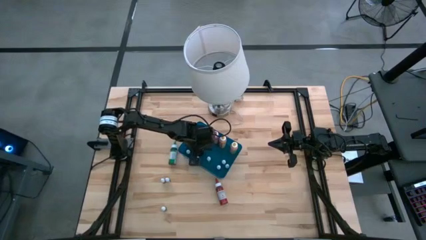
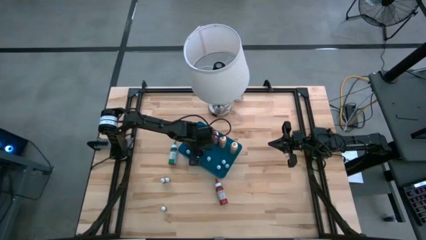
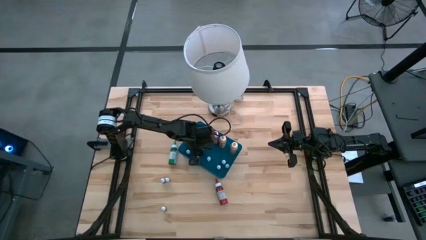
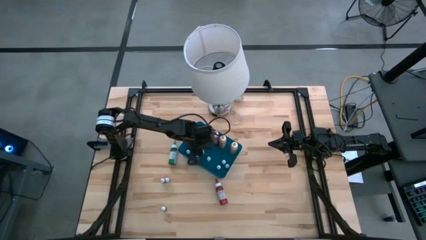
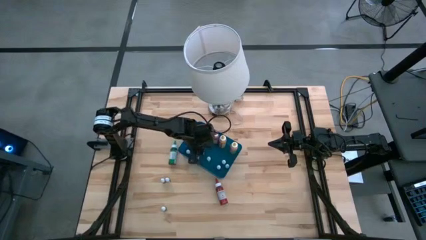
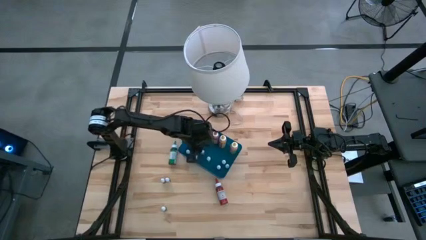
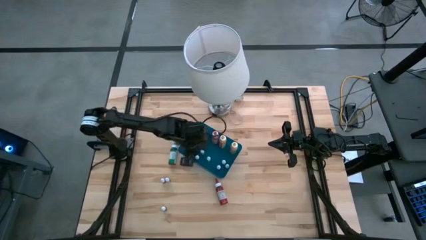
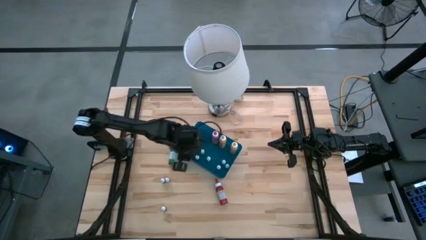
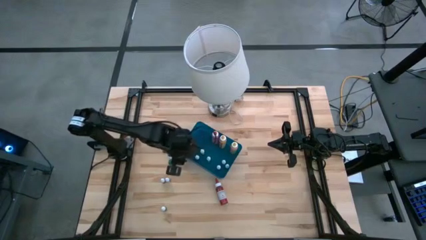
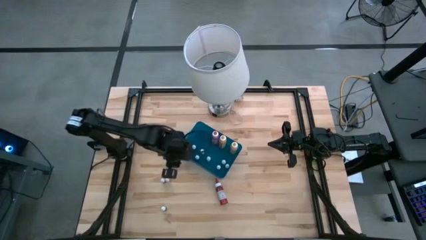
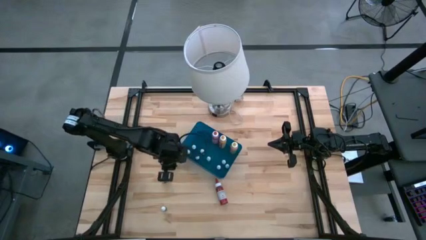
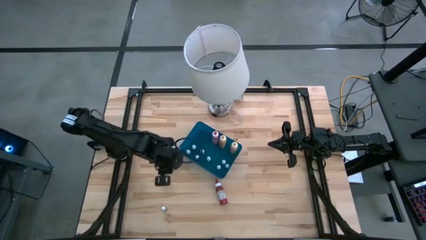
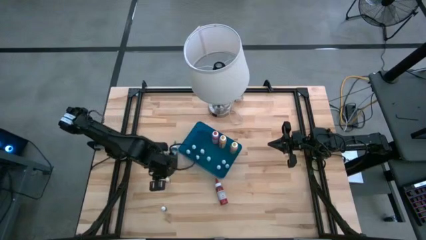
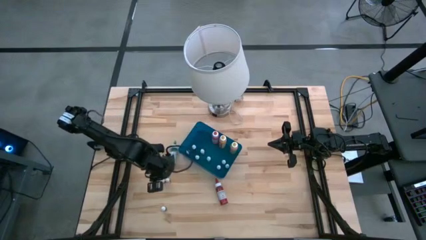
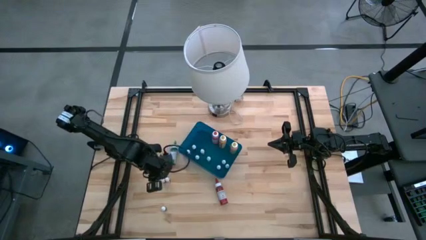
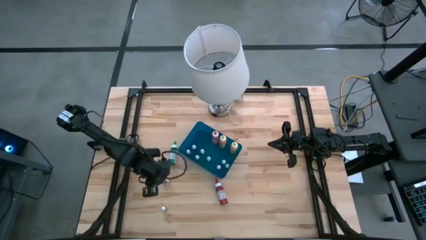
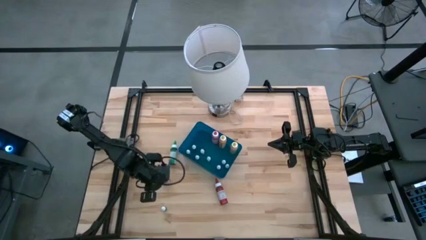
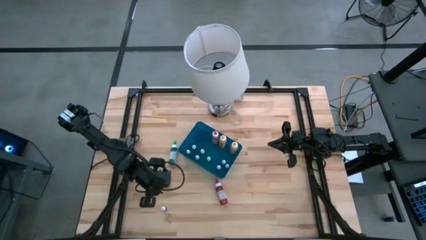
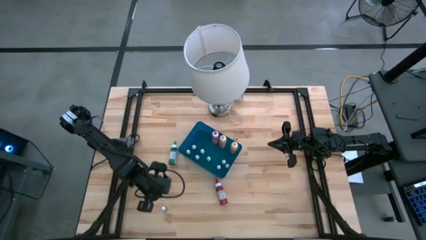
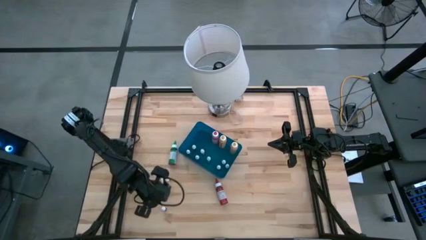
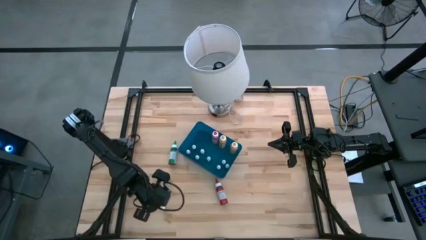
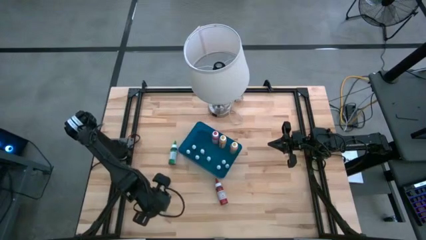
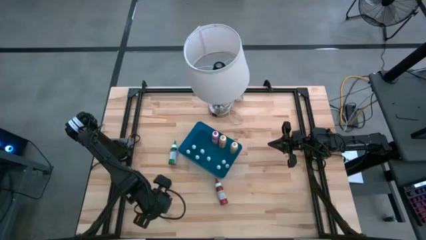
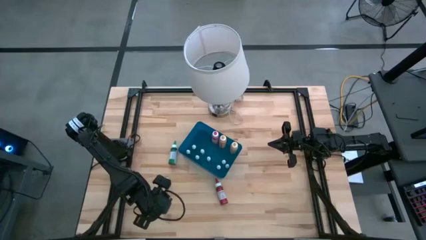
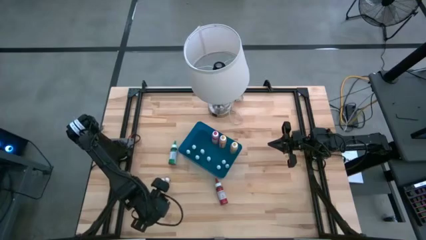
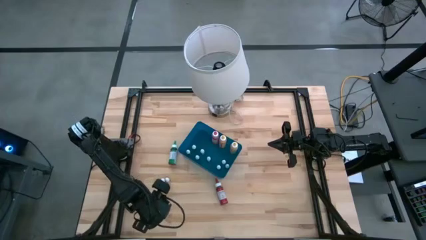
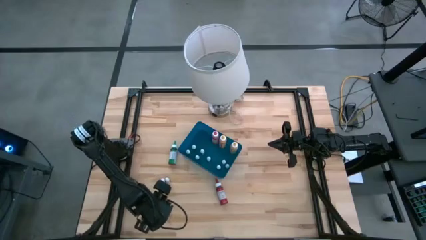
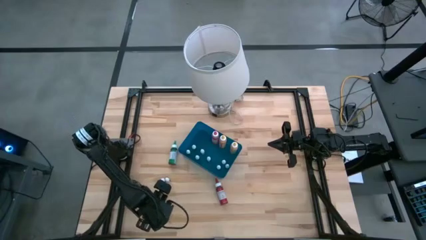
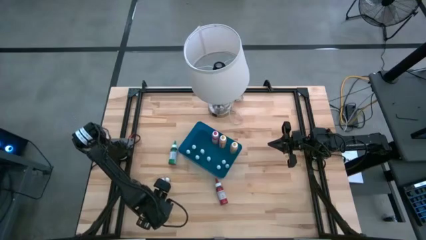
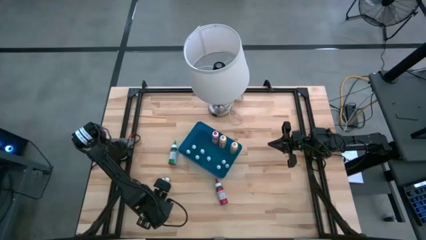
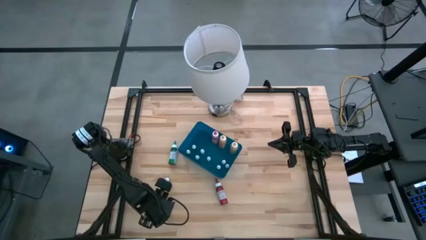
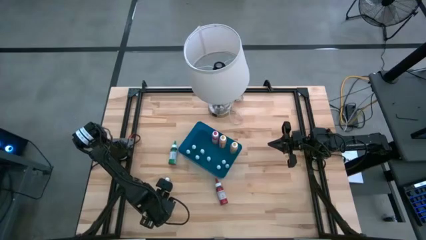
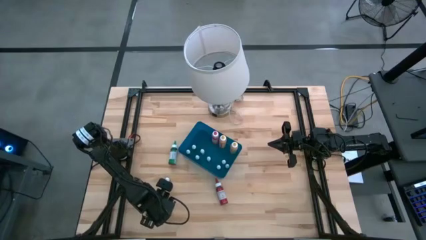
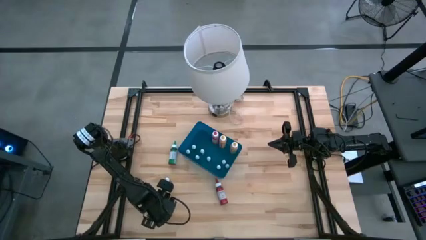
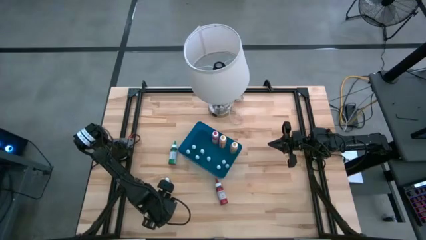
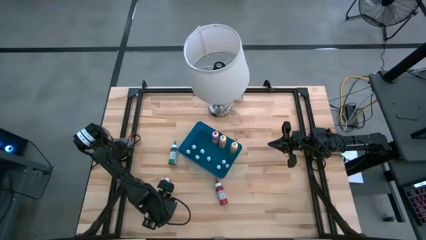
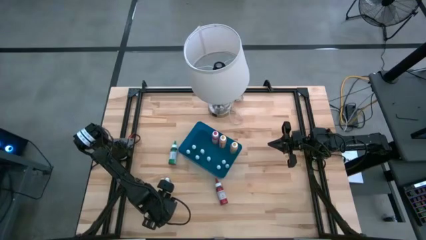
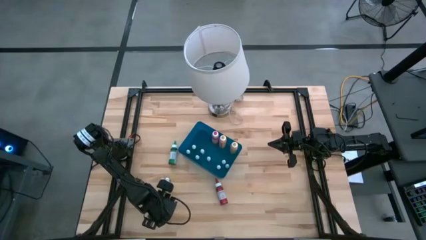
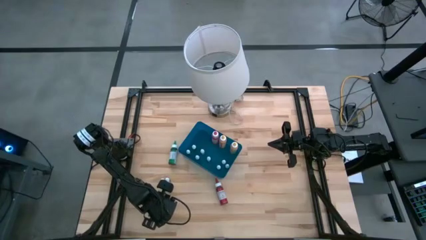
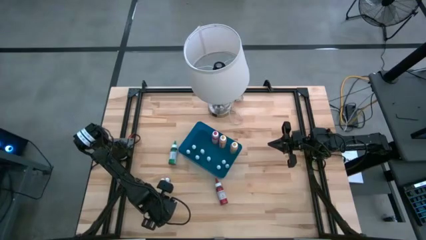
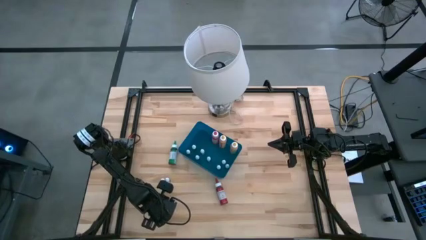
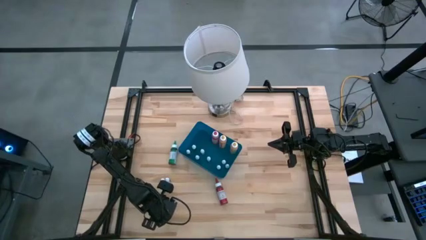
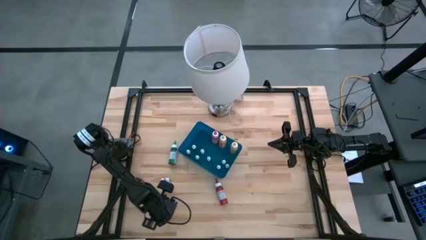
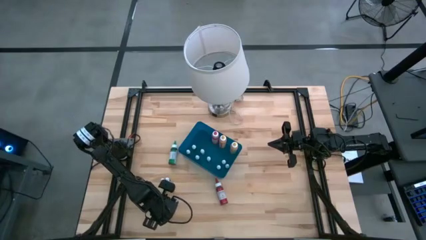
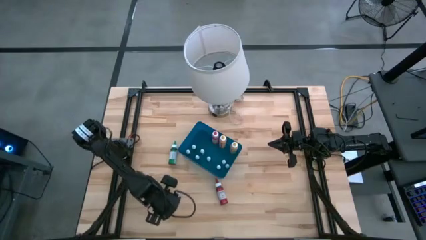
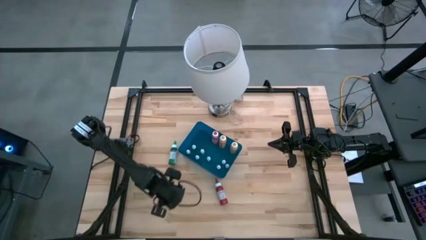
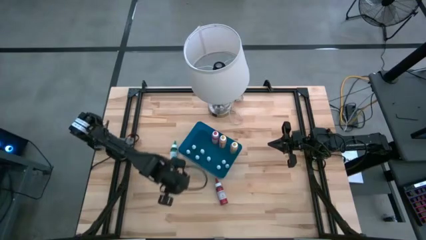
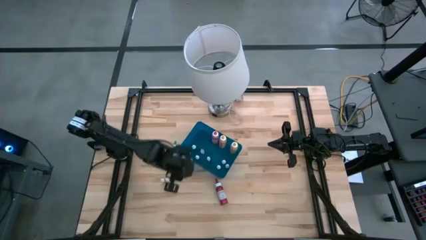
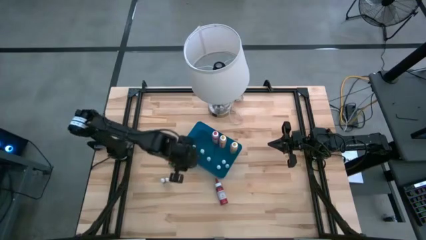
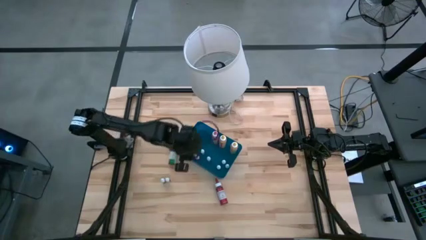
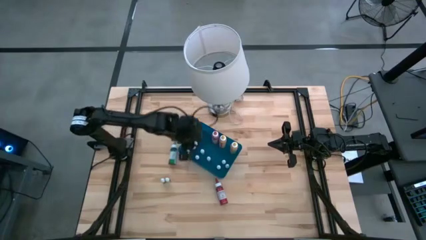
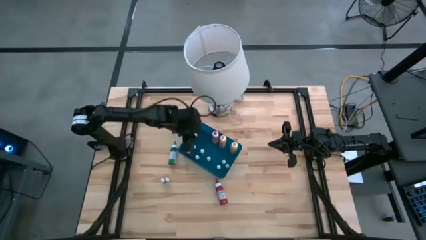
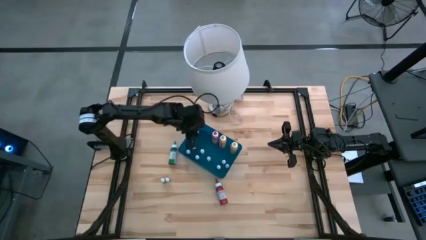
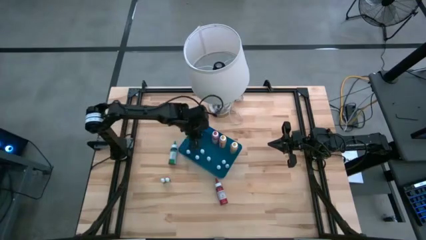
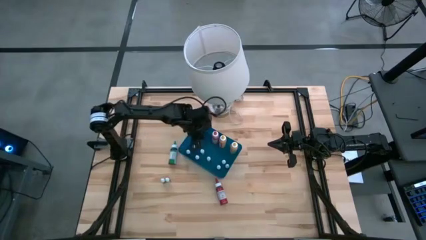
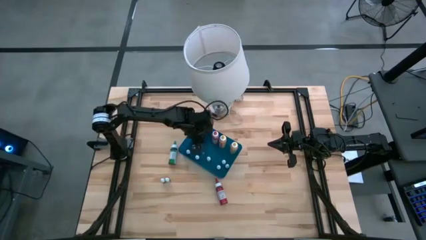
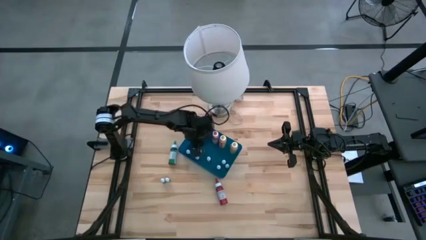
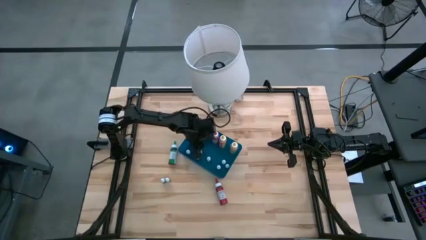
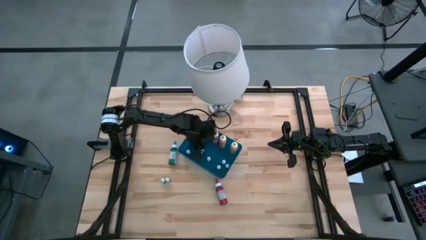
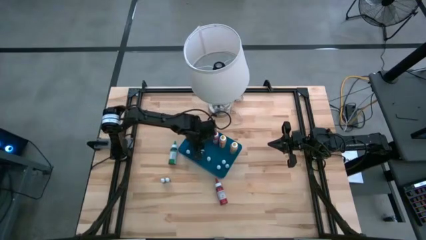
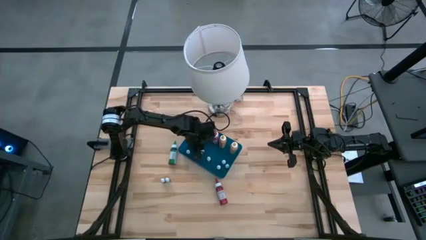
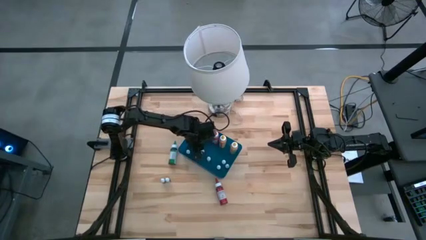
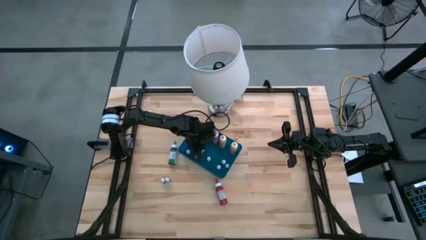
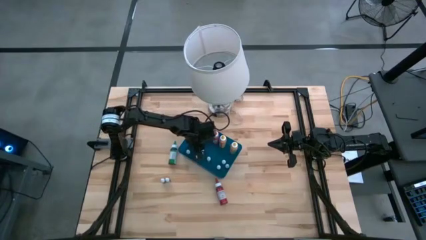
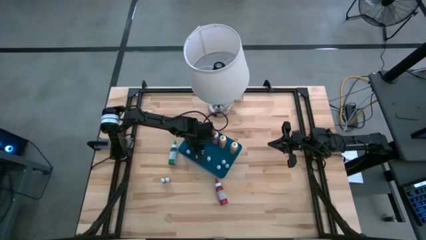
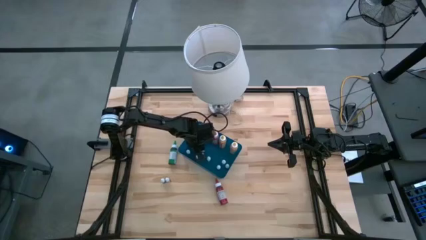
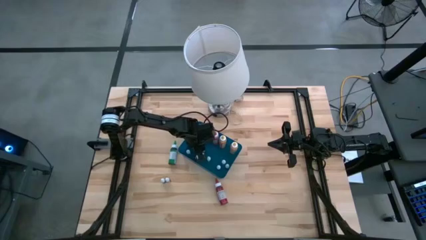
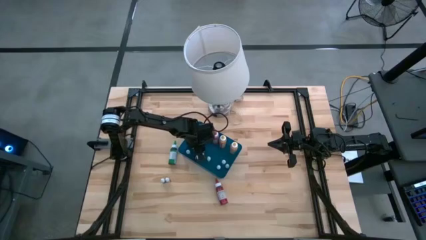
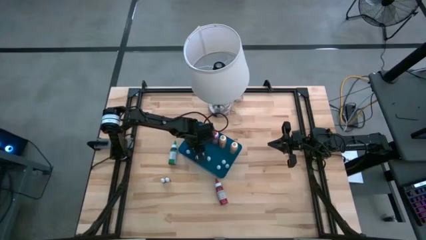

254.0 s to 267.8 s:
Task: Pick & Place food coloring
Put the small purple food coloring bottle into the blue container
